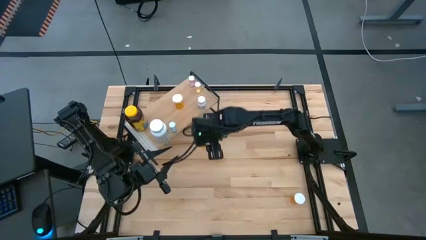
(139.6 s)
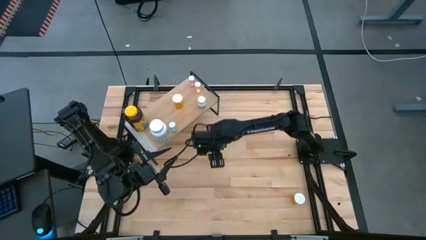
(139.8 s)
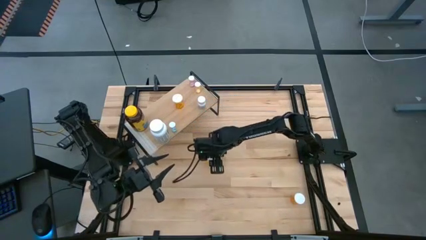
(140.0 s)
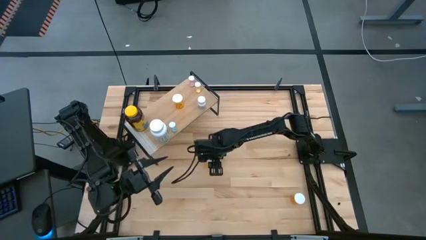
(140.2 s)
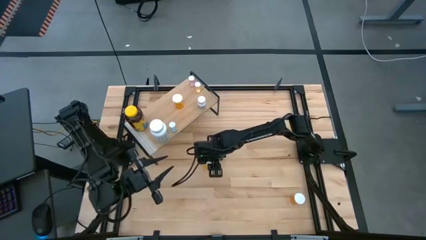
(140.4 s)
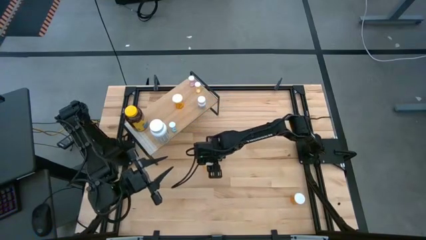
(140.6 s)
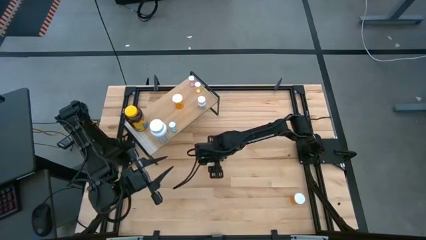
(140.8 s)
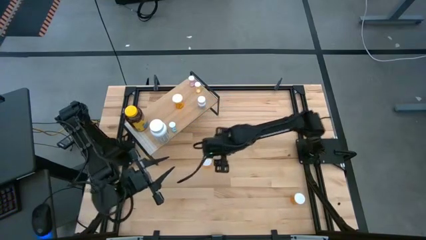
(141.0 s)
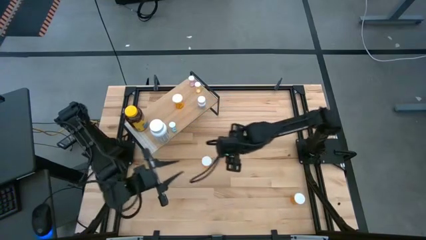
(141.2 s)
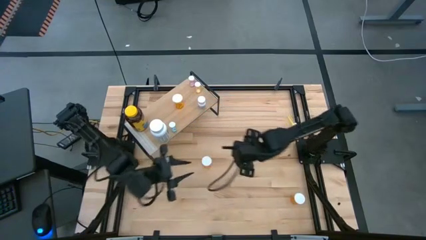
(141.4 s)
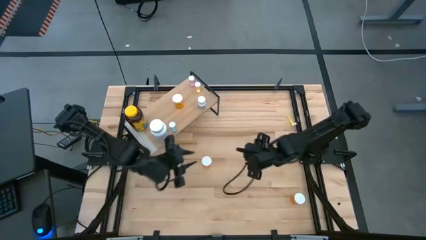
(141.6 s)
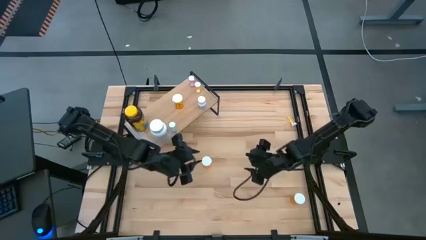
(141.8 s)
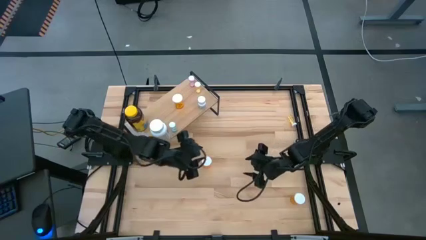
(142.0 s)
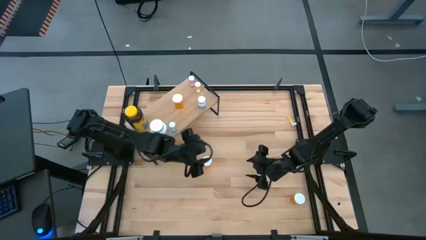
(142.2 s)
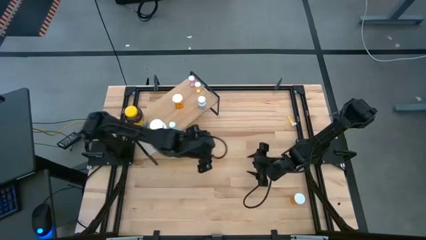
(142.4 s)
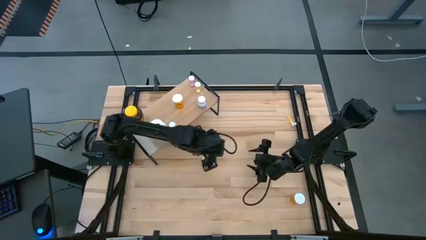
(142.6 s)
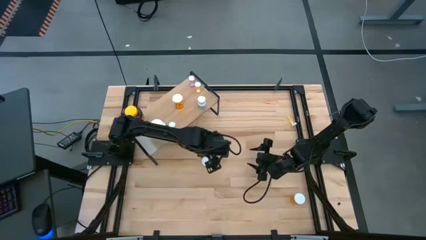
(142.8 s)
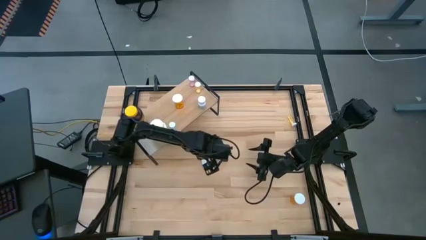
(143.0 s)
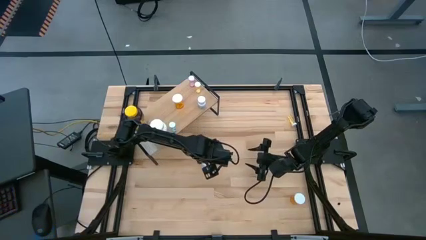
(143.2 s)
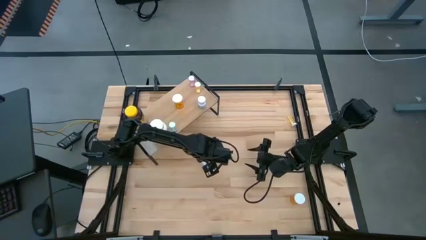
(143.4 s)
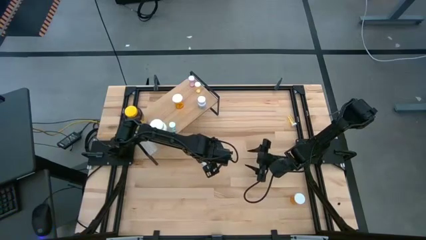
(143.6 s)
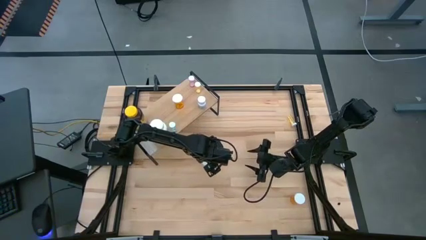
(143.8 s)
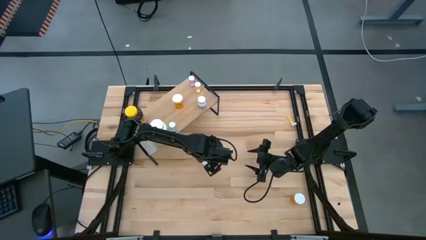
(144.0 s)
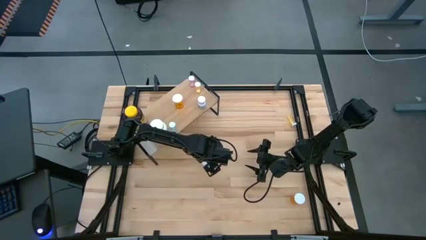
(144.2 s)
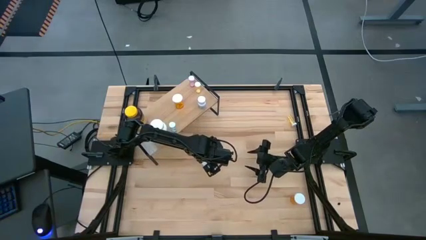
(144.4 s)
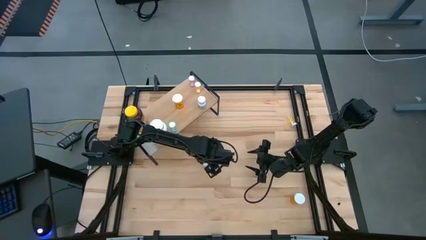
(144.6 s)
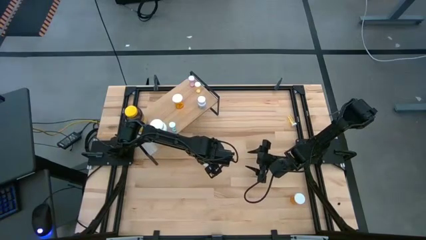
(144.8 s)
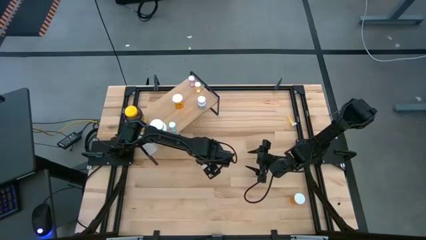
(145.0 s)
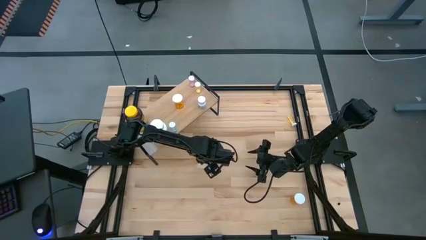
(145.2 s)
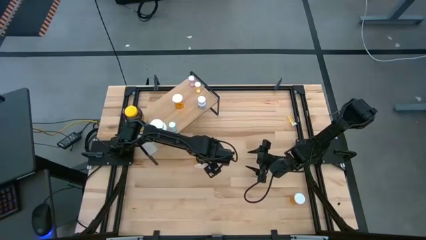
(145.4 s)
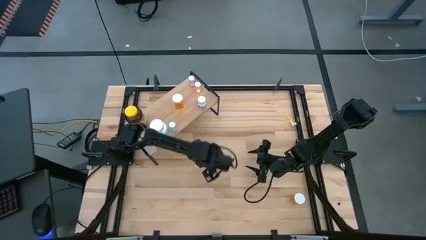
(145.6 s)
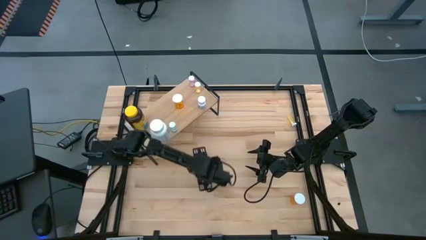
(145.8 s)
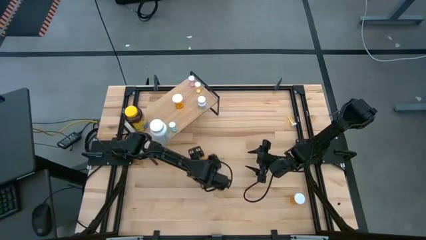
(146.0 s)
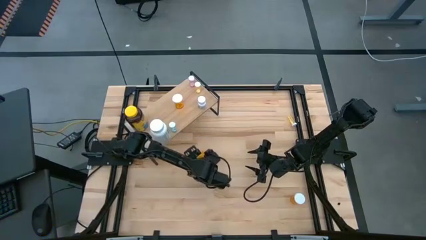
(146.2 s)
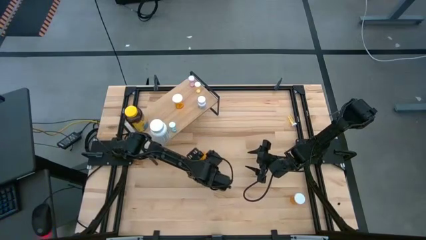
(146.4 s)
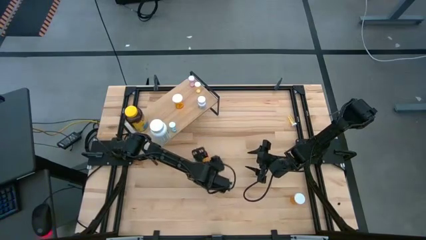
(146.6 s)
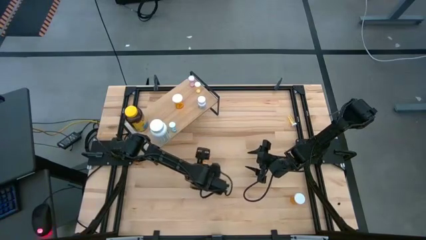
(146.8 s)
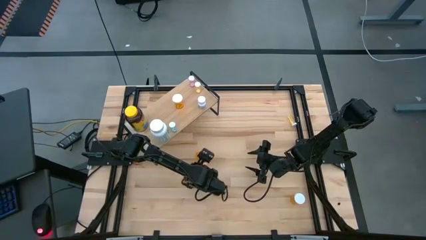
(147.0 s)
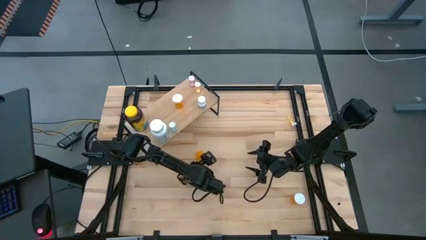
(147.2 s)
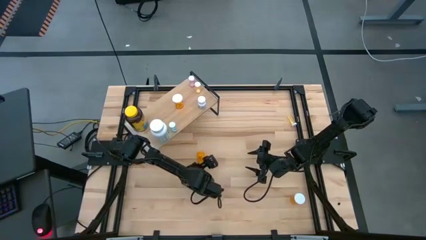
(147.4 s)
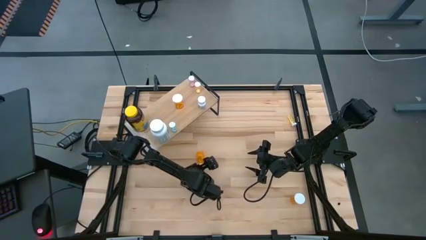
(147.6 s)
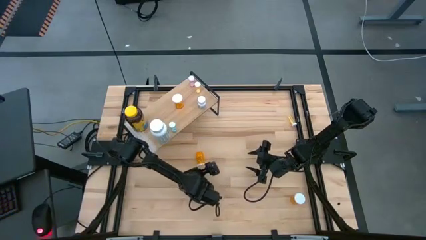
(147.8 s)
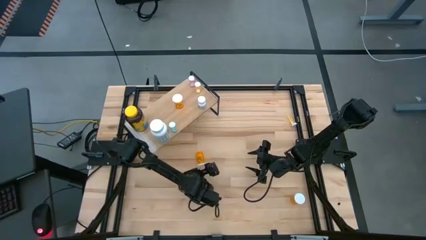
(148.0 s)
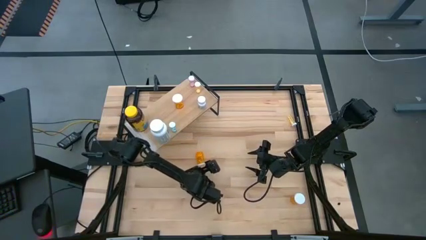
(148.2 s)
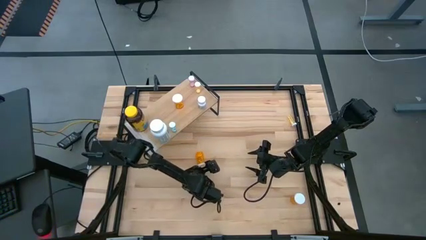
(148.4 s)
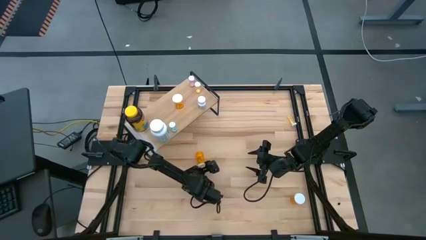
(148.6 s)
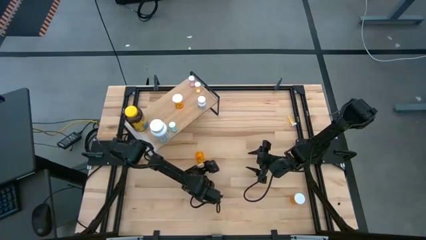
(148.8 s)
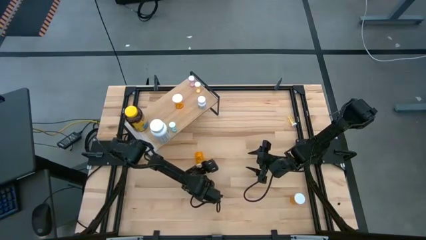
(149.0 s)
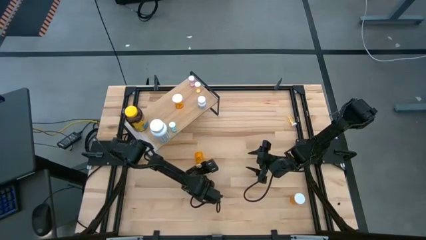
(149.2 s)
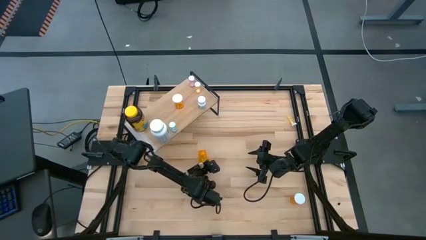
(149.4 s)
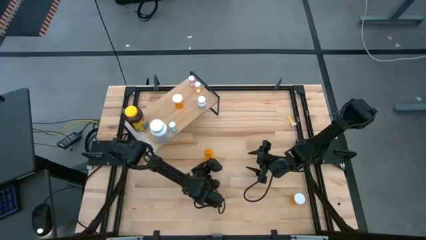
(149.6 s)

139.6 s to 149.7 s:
Task: Pick and place medicine bottles onto shelf by color
Put the top orange pill bottle on the shelf
